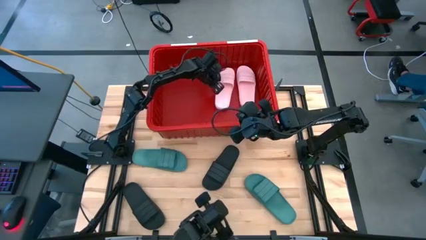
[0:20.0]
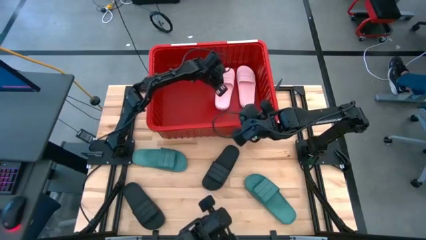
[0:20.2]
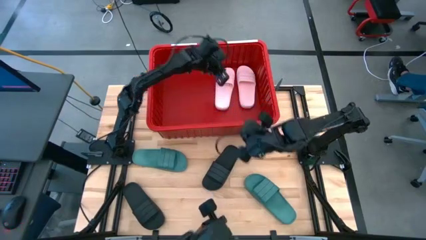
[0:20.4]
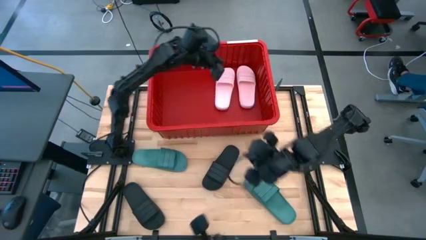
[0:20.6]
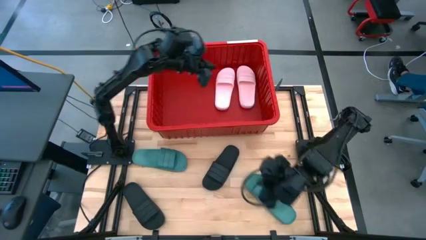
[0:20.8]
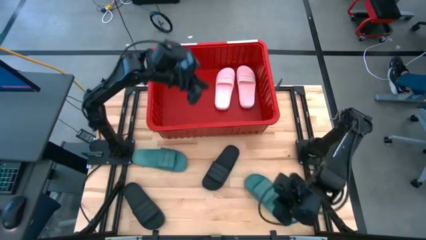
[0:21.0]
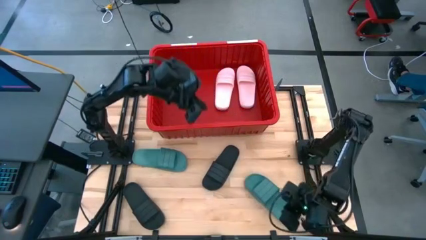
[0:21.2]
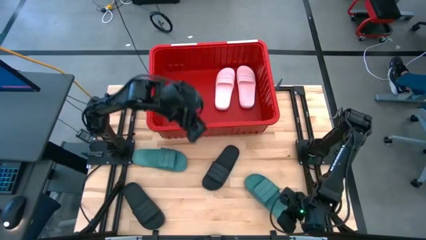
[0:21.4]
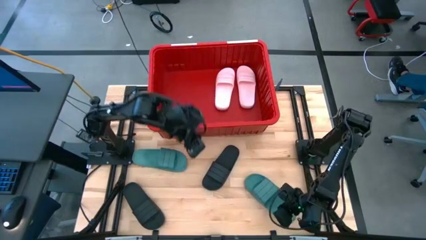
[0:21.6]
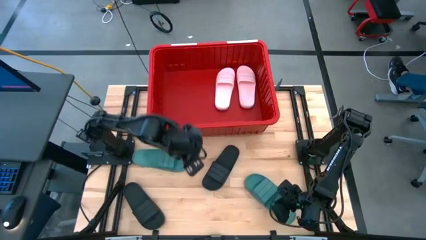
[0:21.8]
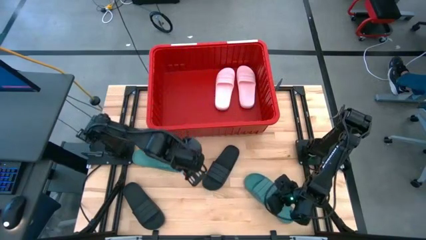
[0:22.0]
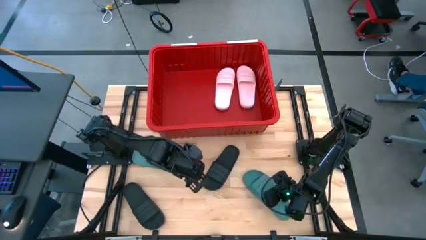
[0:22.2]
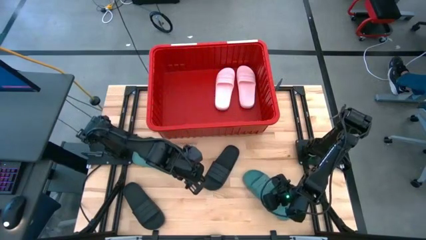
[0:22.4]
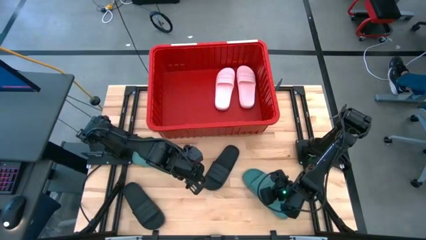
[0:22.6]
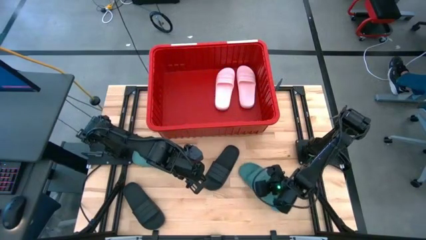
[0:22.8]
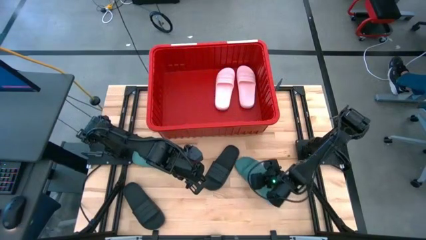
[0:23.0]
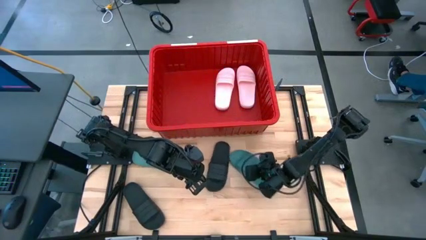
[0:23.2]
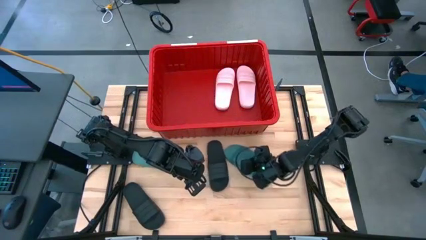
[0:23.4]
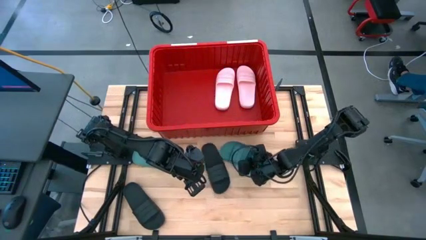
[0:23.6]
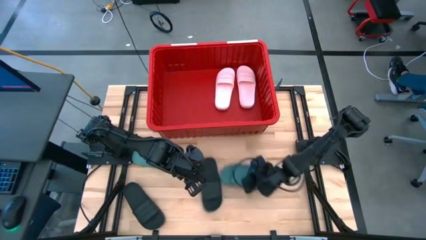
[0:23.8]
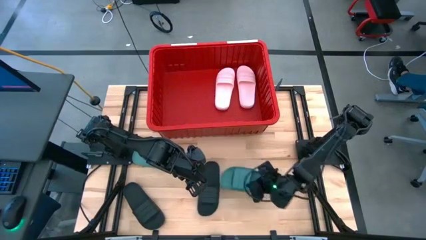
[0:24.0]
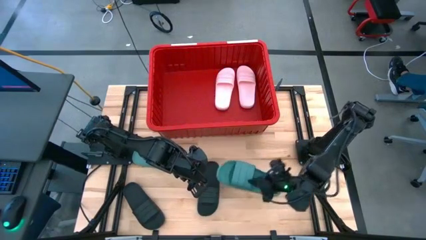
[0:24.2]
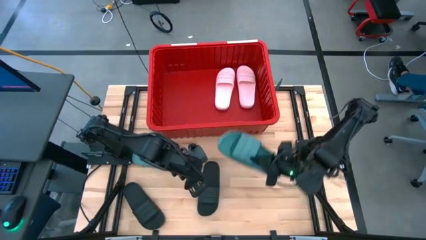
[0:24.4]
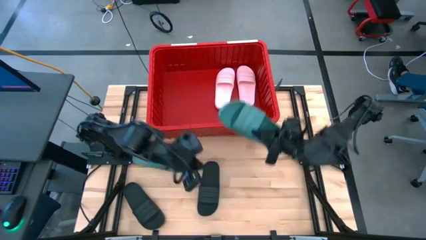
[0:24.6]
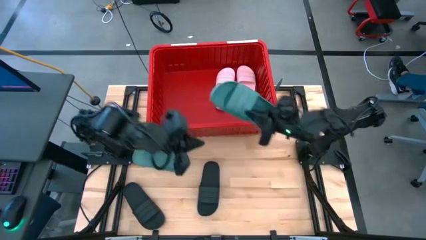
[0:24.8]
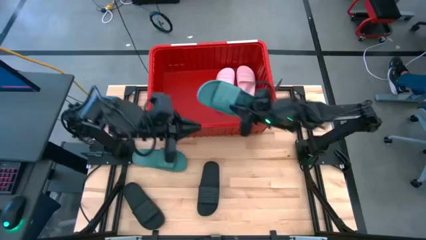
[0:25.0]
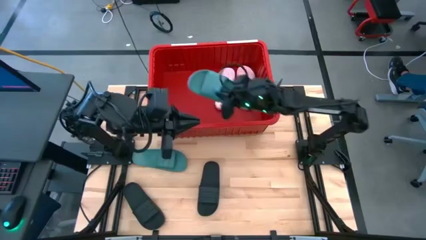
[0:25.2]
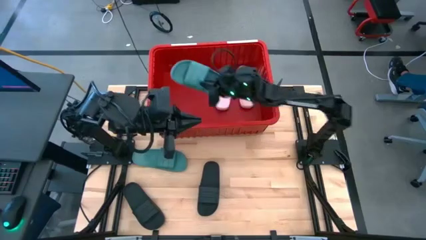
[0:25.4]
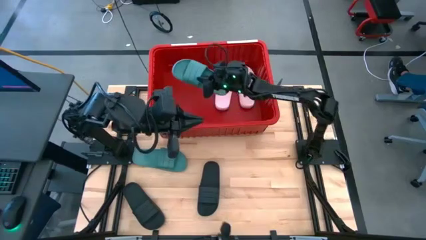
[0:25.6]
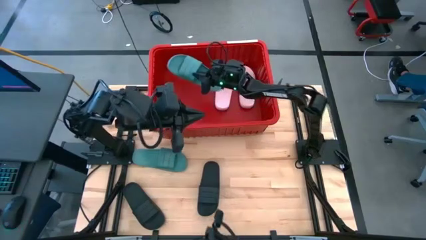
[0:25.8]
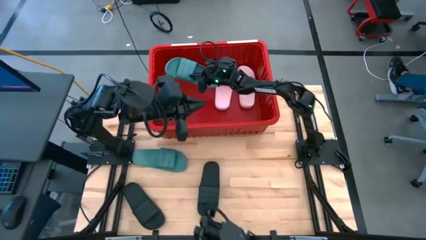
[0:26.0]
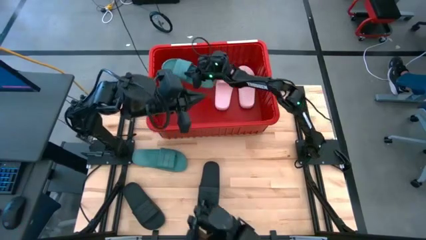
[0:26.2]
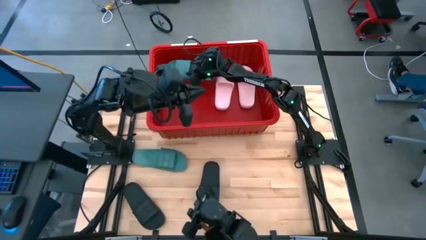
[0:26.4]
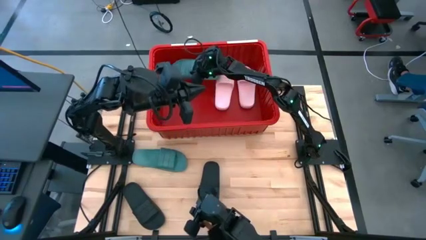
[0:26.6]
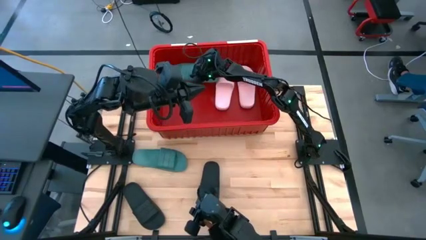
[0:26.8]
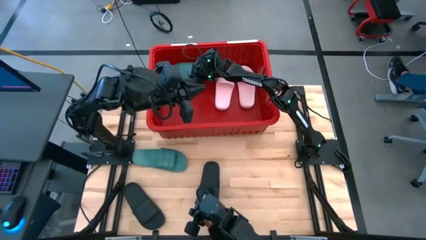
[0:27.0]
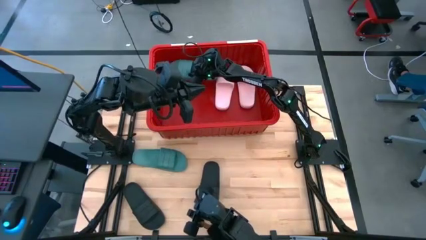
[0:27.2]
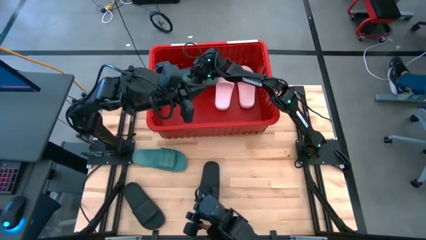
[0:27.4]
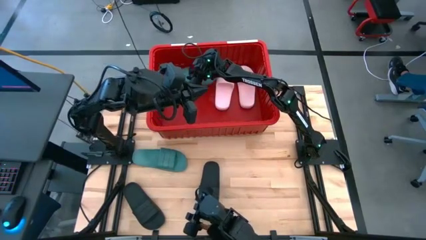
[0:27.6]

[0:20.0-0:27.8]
Task: Pick and place slides into bin
Put the bottom green slide into the red container

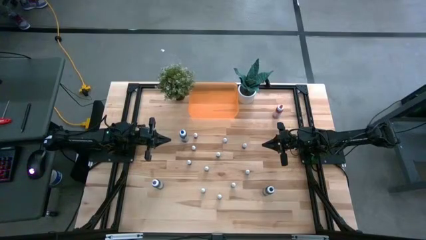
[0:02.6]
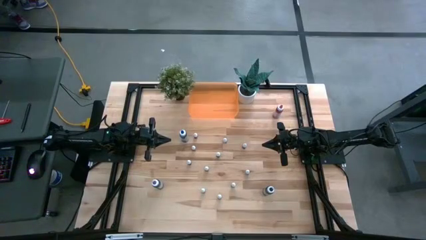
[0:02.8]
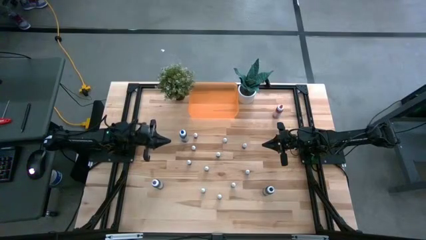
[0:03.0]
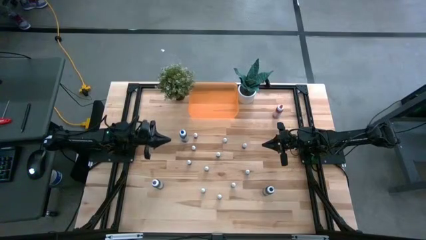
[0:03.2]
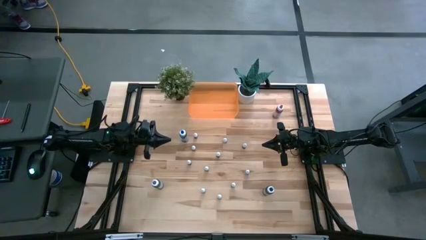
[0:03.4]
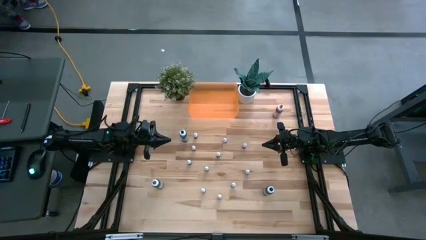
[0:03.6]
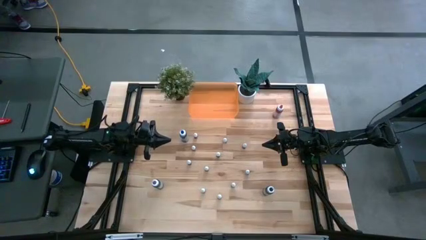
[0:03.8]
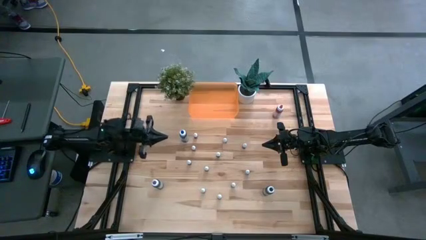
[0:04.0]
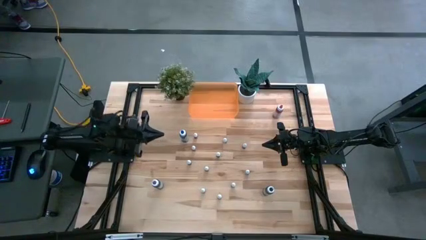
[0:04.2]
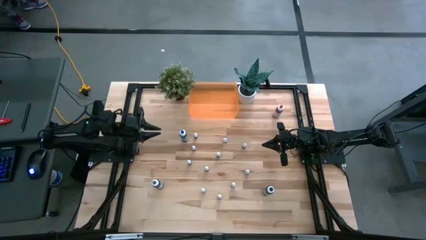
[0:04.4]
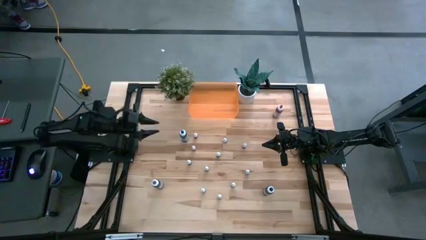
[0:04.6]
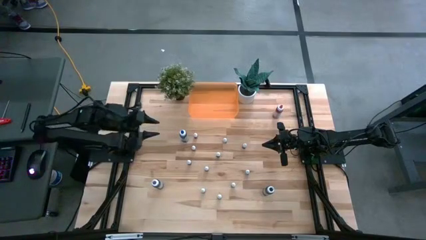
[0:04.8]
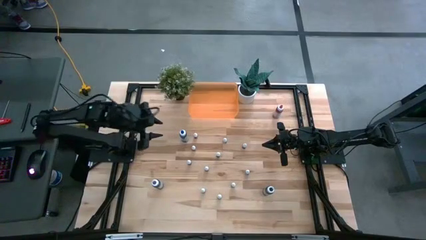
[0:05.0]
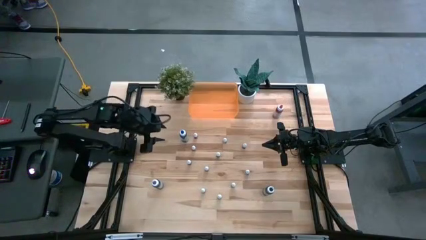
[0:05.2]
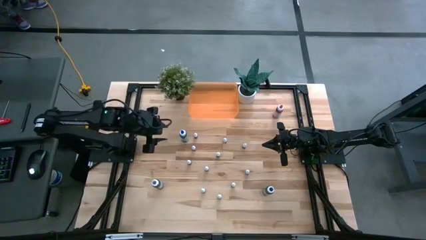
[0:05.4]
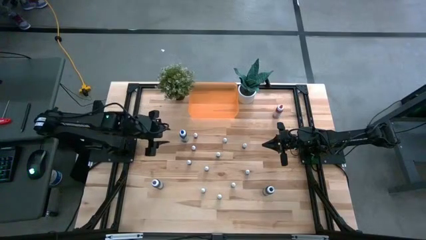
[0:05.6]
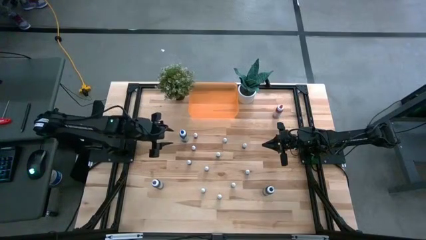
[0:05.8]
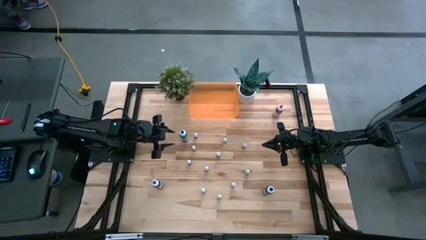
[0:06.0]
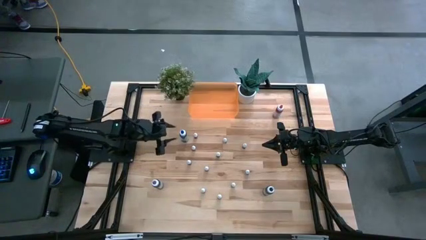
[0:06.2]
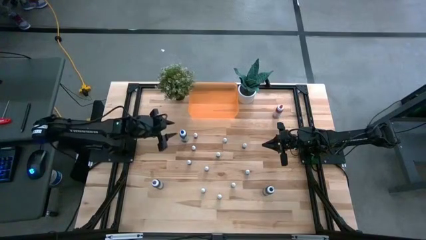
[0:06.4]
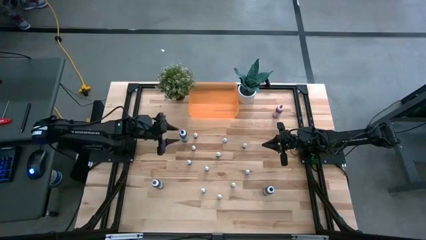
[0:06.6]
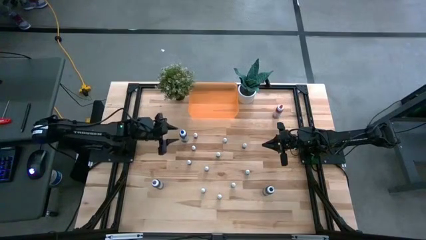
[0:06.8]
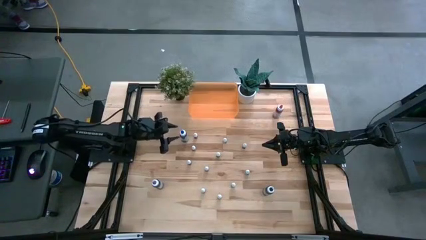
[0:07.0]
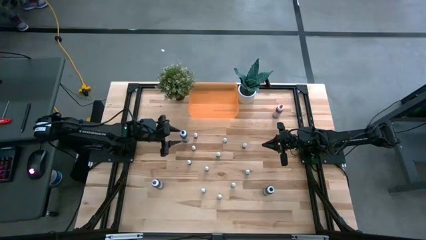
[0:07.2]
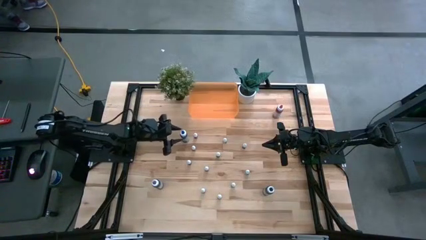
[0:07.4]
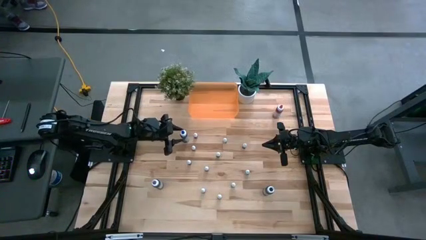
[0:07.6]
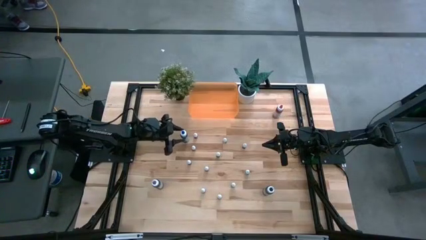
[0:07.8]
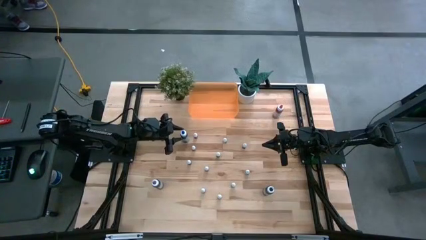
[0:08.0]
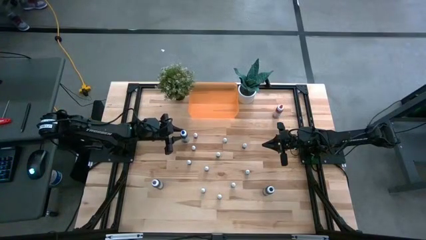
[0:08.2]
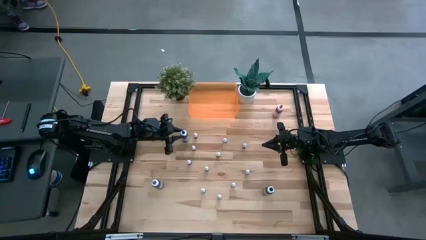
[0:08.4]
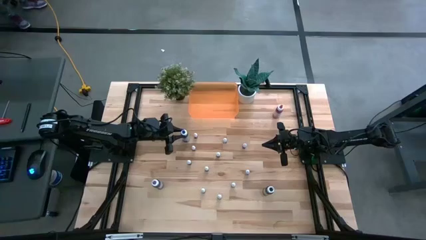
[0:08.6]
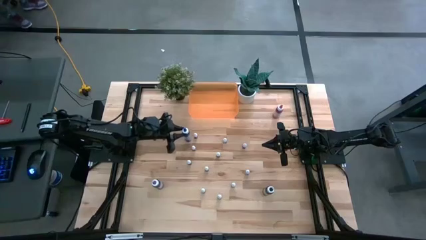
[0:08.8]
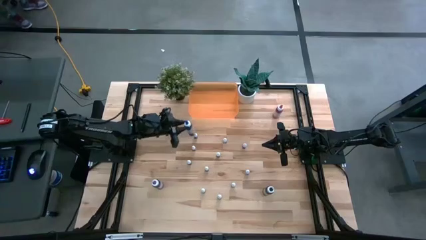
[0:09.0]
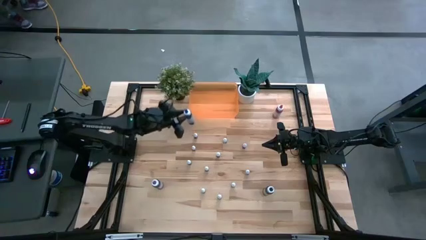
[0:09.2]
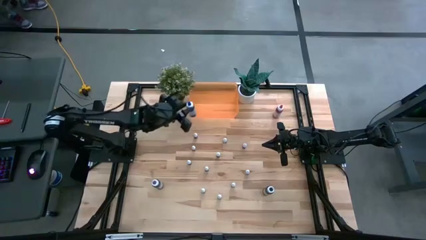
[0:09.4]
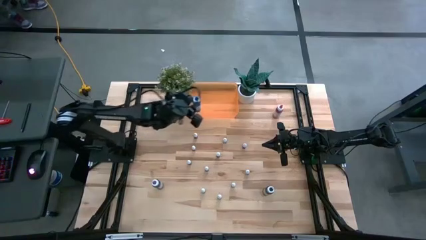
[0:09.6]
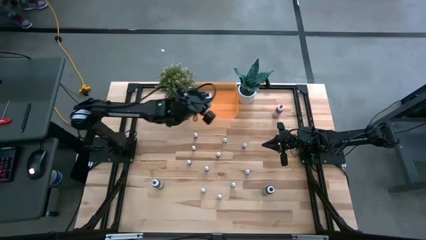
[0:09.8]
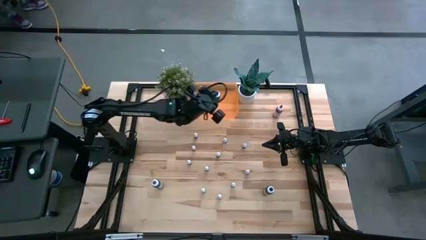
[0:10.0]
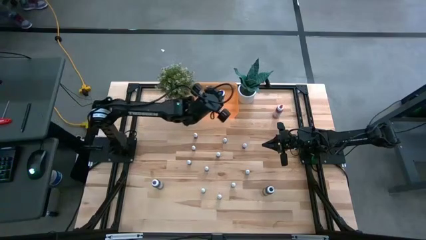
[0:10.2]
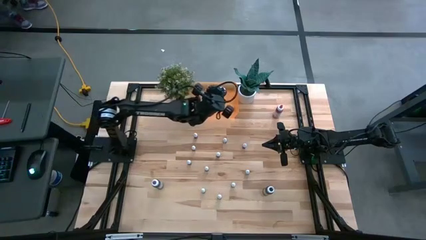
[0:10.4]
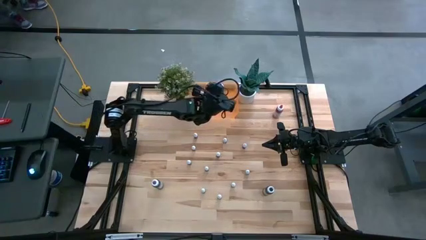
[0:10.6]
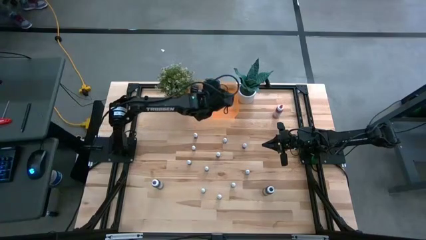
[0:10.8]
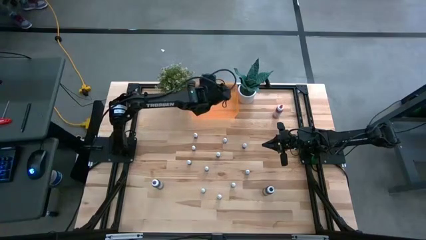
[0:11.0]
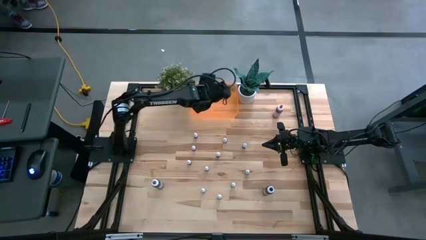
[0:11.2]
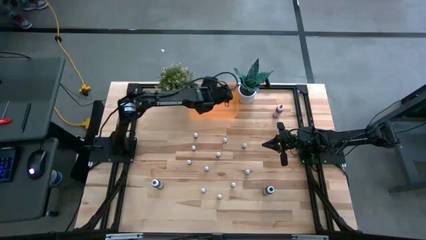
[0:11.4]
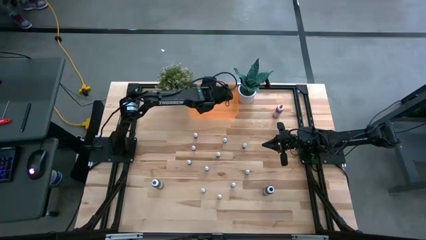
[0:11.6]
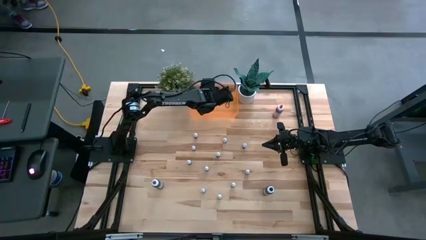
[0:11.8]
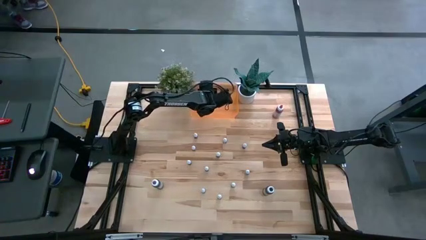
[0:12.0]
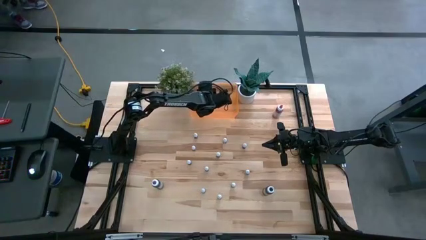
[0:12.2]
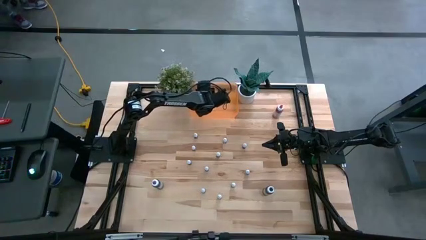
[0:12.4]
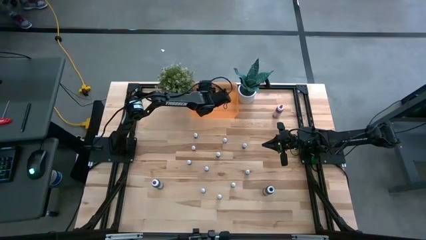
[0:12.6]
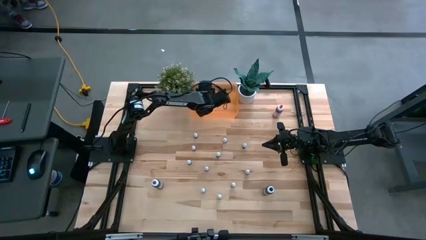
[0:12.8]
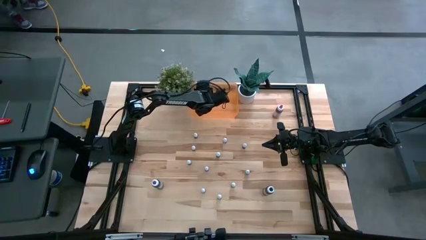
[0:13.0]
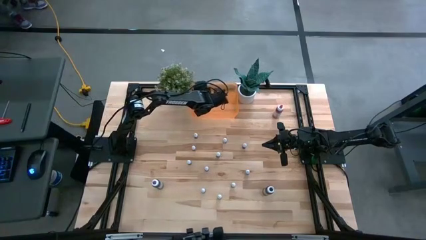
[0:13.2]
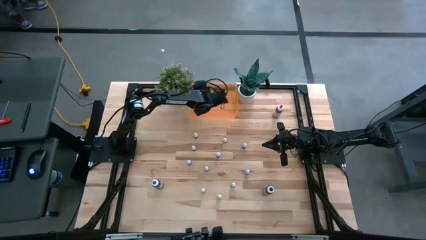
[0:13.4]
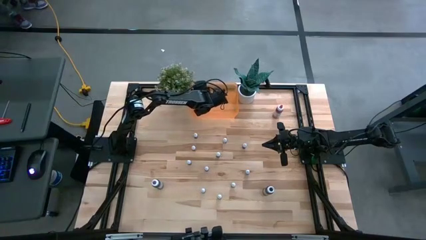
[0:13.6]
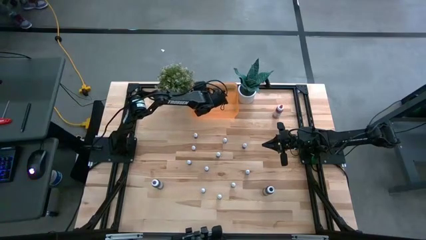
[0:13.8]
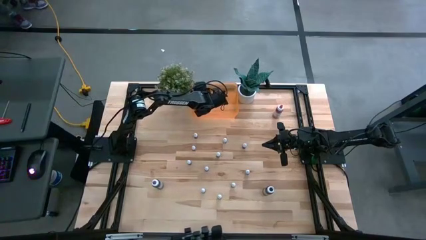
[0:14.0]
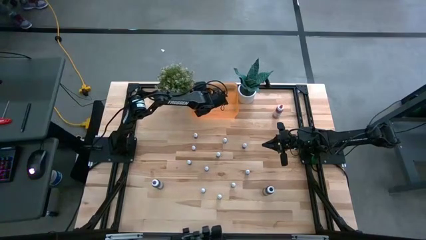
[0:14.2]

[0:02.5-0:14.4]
Task: Pick & Place food coloring
Put the large blue bottle into the bin
